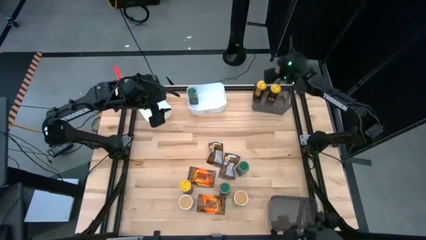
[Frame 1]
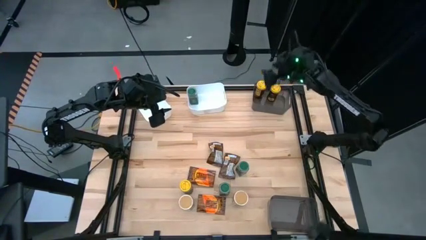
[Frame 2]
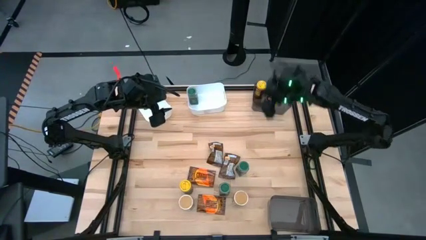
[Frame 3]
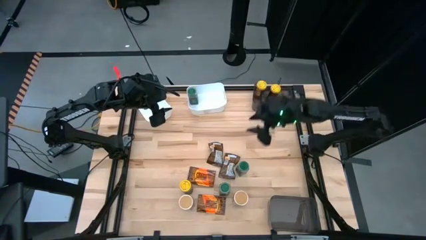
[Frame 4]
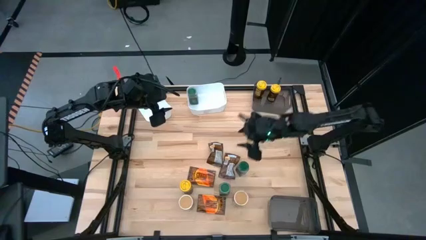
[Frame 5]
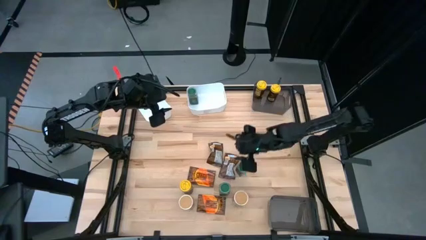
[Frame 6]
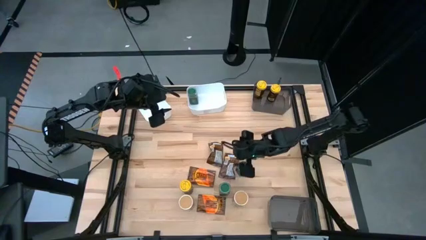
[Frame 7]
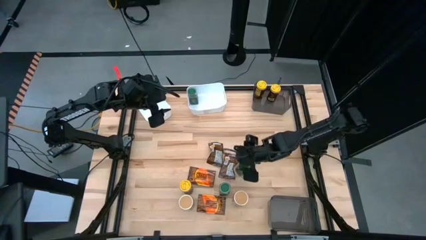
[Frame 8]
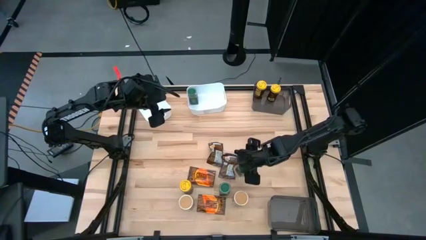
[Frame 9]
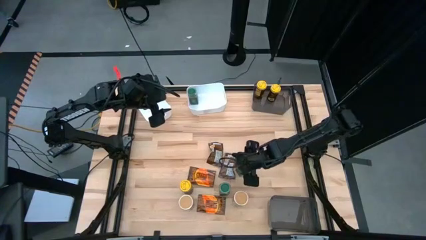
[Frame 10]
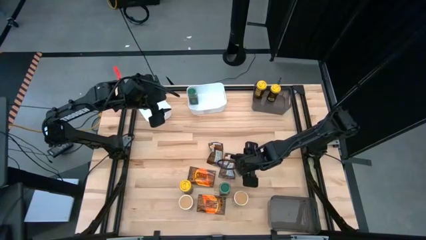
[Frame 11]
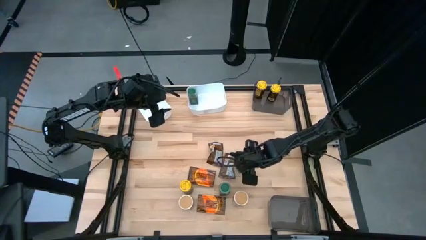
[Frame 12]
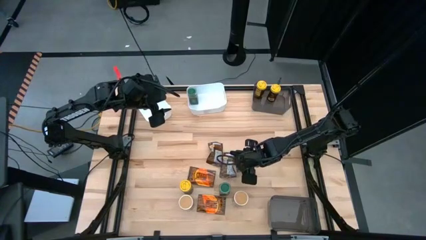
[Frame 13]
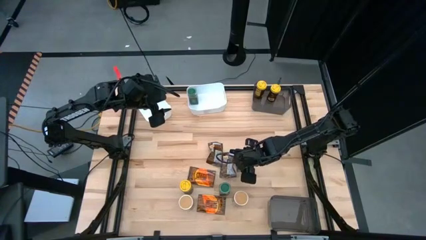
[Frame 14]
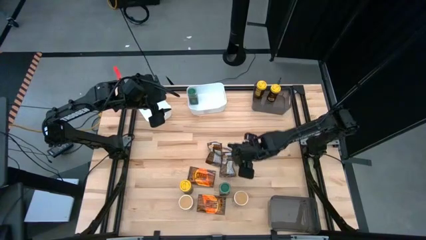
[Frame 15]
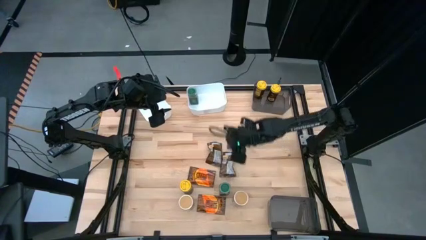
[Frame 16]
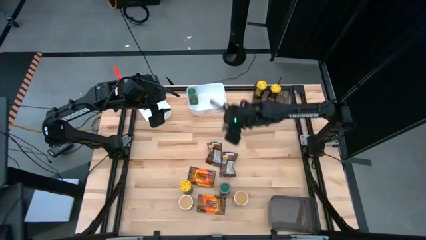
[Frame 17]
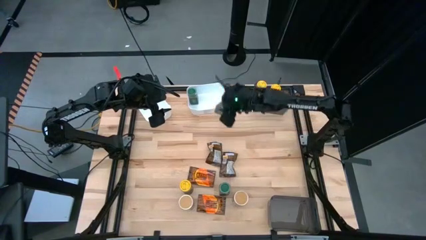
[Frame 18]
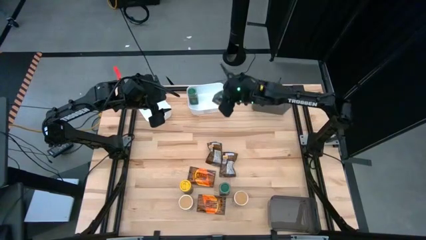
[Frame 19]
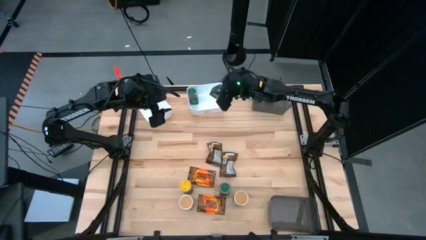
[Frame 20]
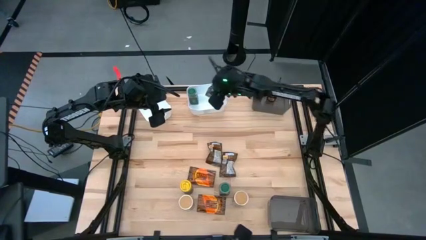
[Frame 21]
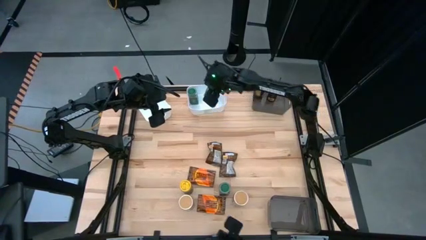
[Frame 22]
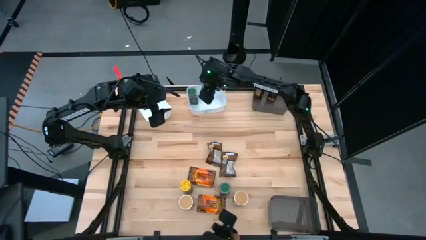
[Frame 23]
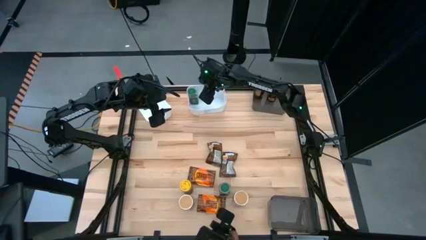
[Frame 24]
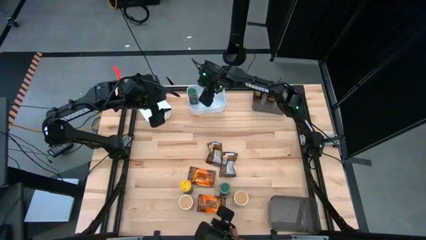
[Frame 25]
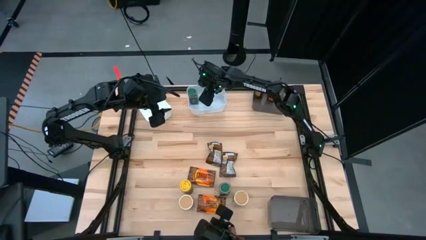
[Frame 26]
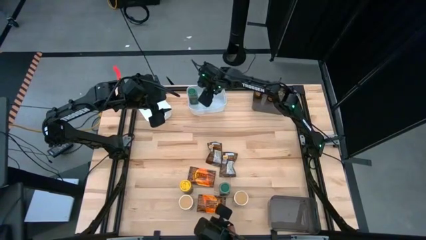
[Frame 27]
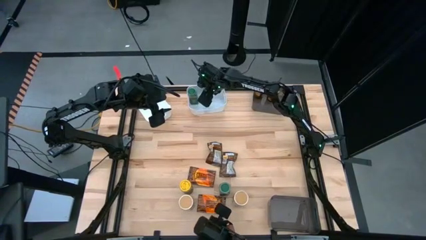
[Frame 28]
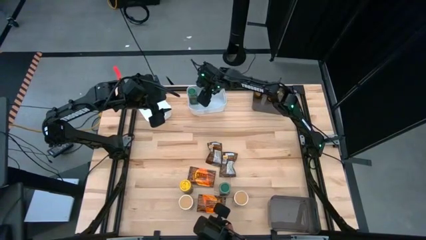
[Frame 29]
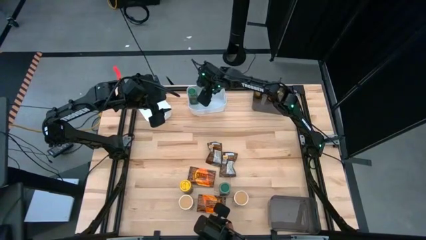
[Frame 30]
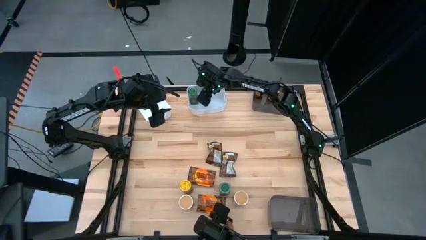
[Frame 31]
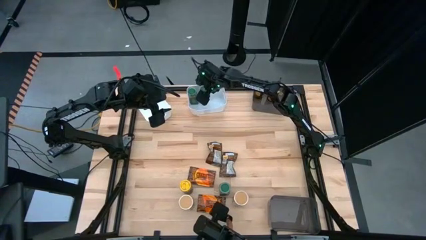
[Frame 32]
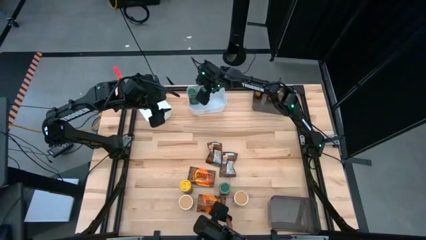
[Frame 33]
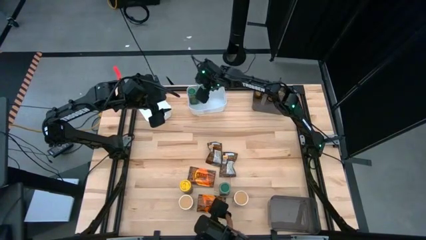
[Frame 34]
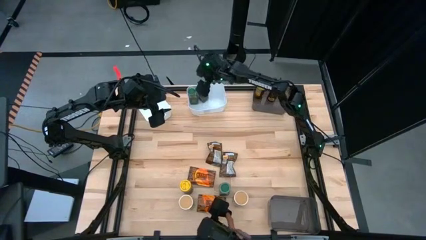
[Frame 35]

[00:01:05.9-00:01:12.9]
Task: Sort spices by type
Put the top green seasoning bottle into the right white bin

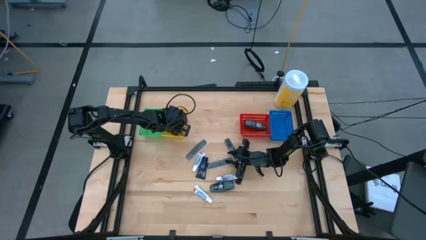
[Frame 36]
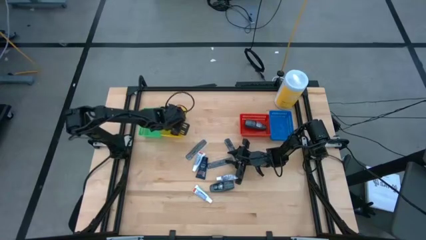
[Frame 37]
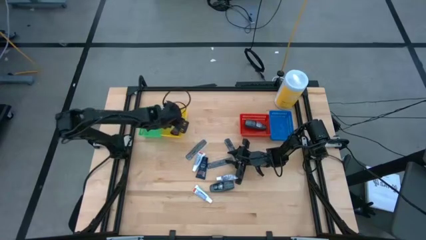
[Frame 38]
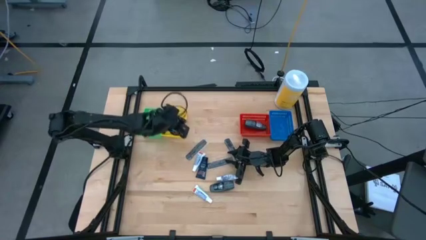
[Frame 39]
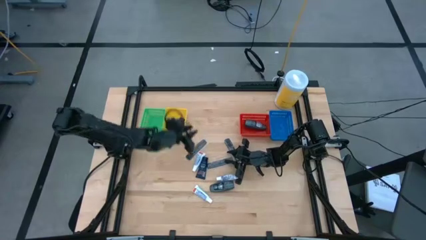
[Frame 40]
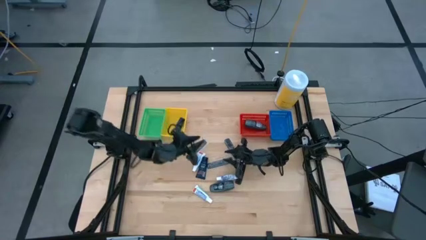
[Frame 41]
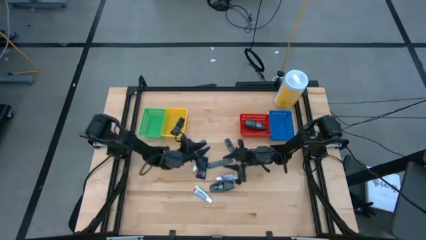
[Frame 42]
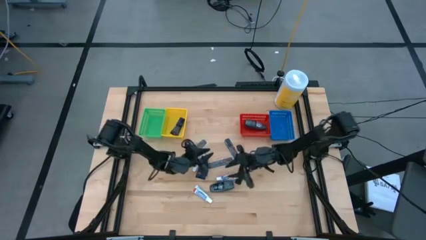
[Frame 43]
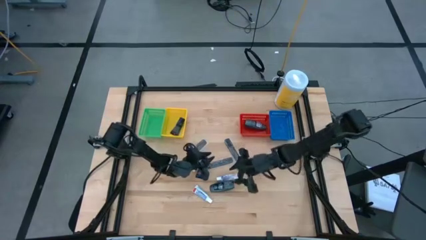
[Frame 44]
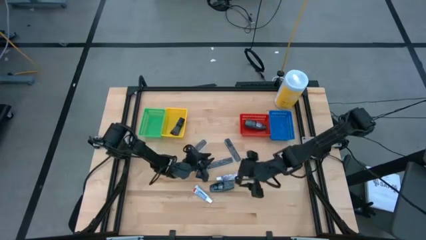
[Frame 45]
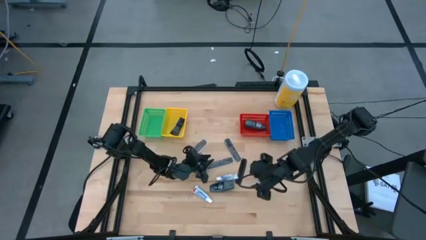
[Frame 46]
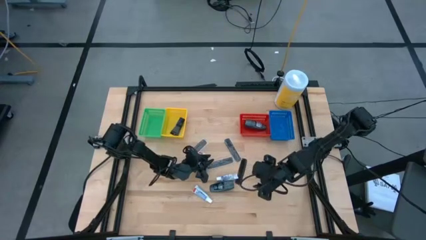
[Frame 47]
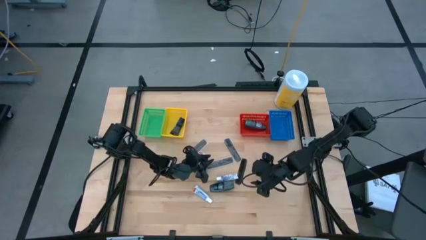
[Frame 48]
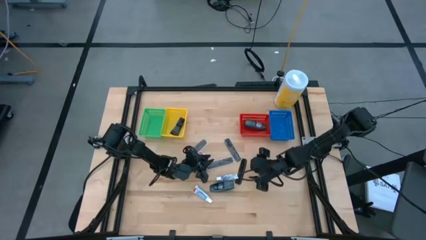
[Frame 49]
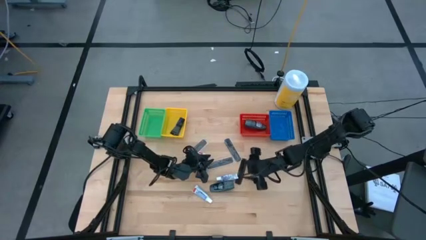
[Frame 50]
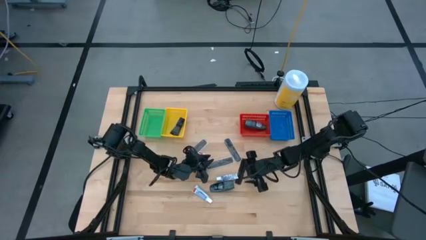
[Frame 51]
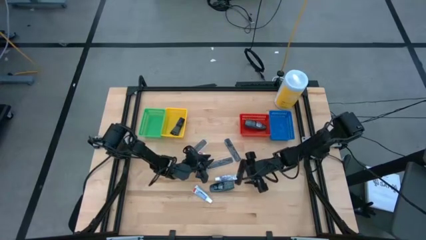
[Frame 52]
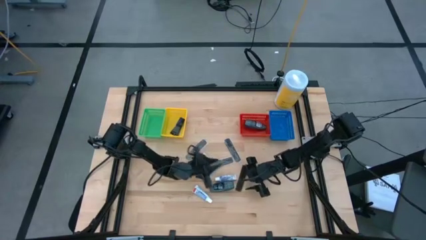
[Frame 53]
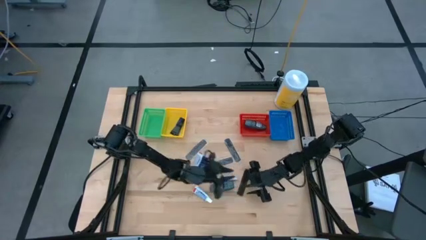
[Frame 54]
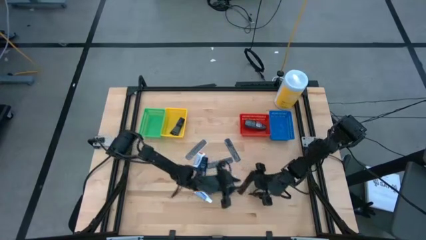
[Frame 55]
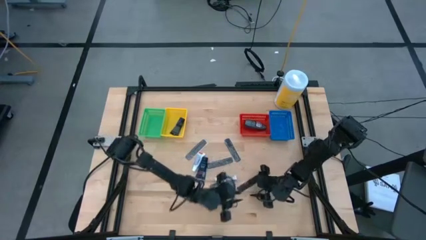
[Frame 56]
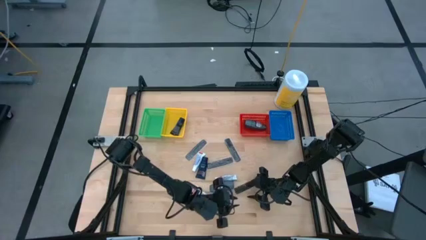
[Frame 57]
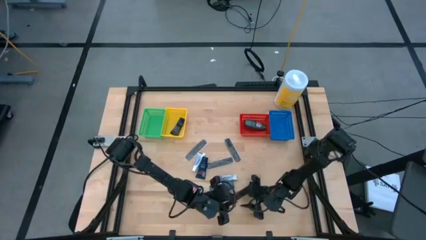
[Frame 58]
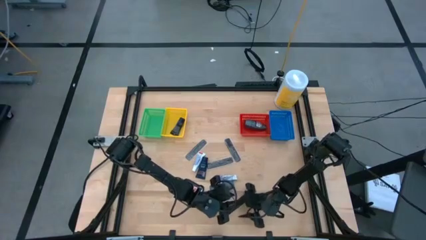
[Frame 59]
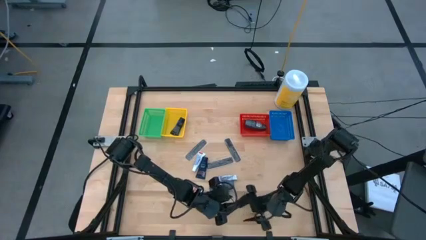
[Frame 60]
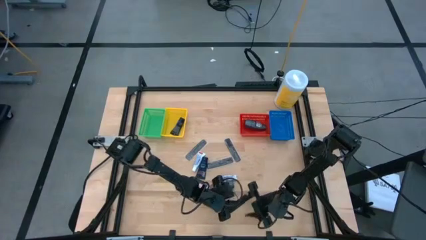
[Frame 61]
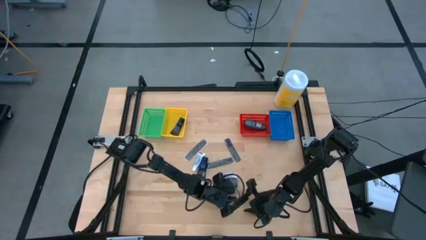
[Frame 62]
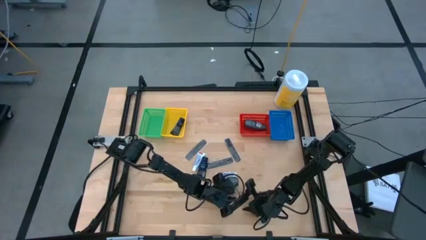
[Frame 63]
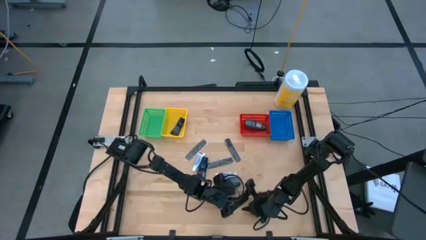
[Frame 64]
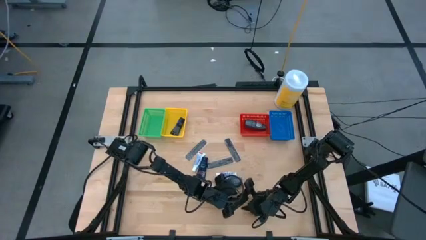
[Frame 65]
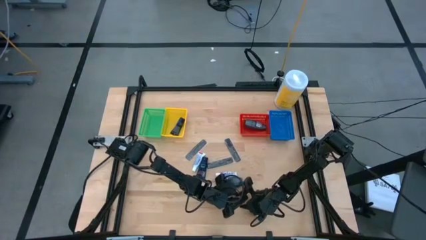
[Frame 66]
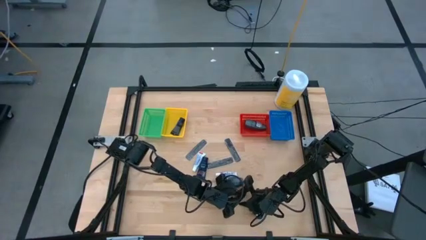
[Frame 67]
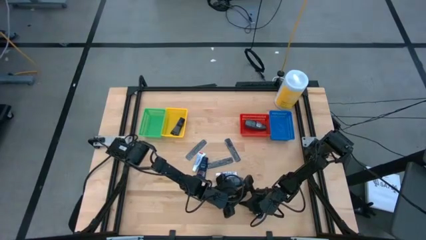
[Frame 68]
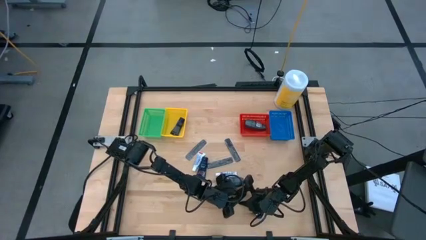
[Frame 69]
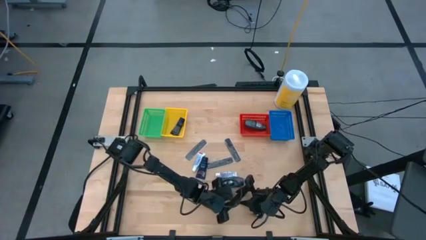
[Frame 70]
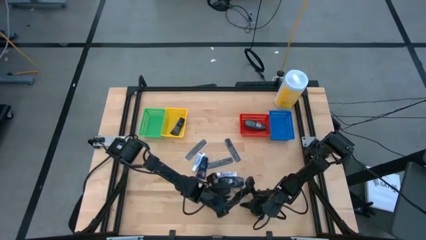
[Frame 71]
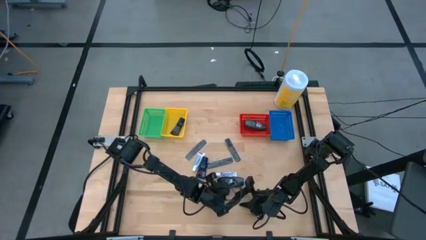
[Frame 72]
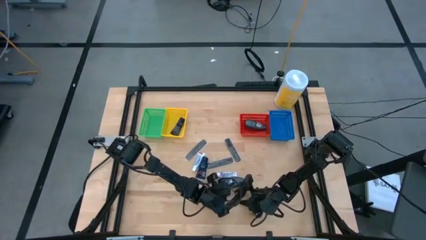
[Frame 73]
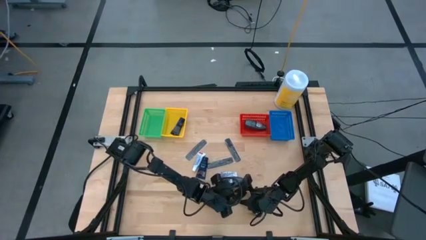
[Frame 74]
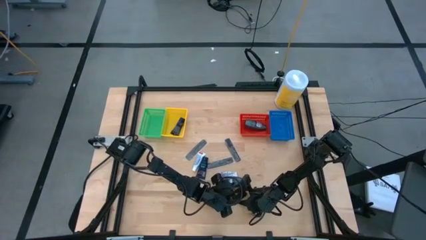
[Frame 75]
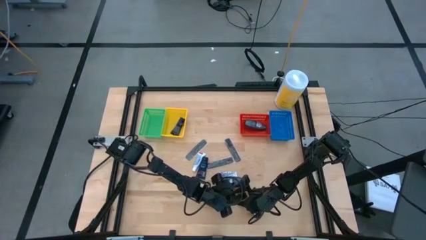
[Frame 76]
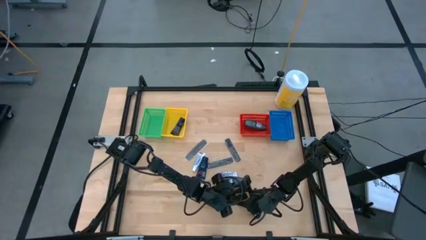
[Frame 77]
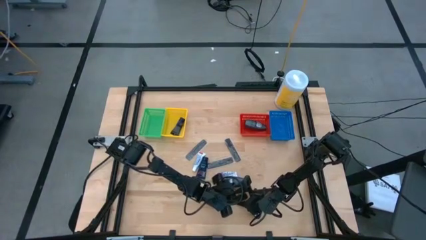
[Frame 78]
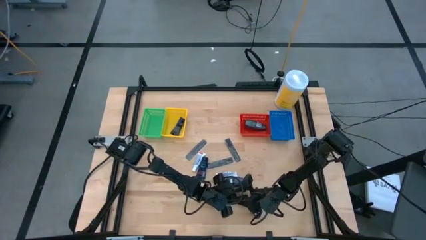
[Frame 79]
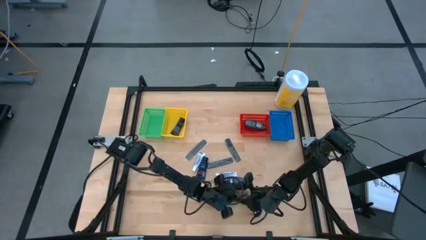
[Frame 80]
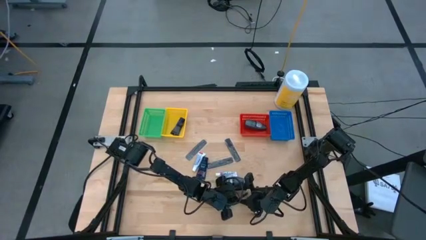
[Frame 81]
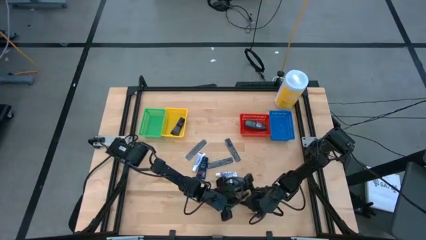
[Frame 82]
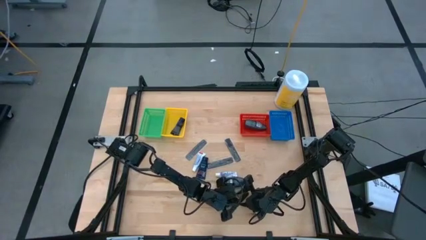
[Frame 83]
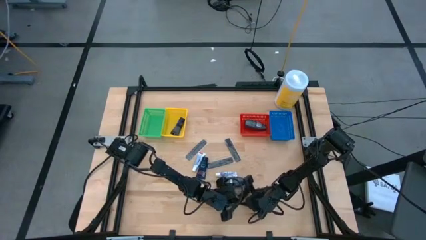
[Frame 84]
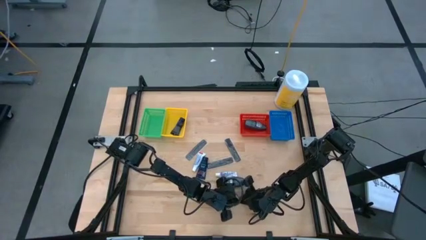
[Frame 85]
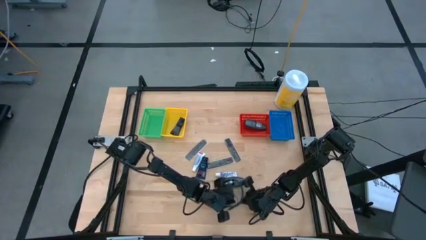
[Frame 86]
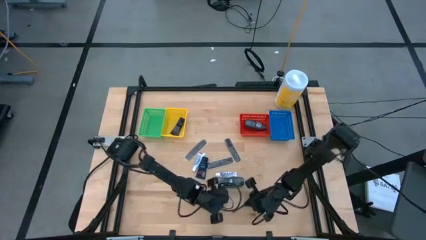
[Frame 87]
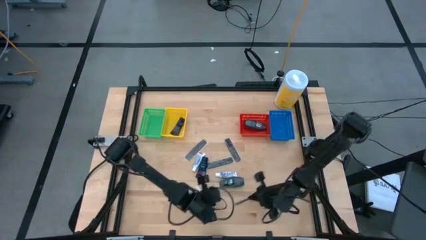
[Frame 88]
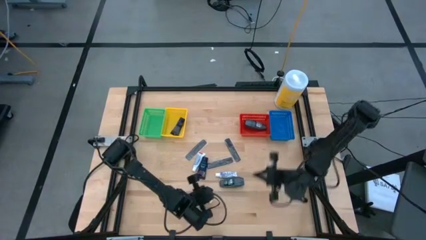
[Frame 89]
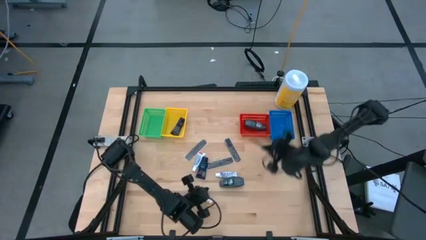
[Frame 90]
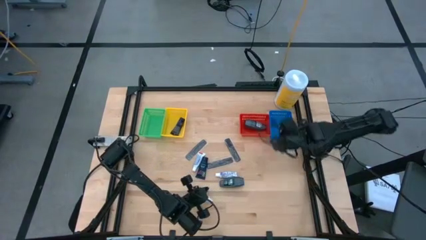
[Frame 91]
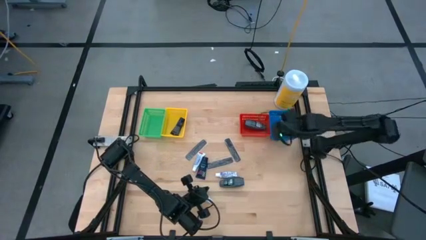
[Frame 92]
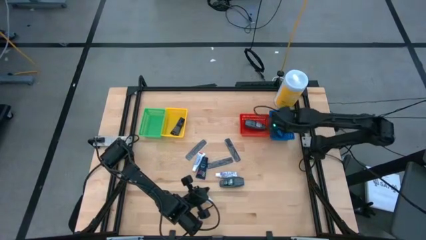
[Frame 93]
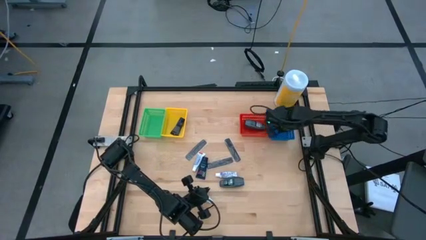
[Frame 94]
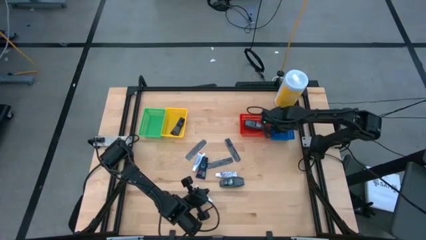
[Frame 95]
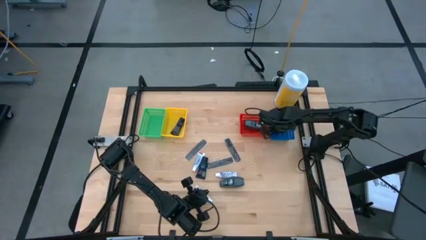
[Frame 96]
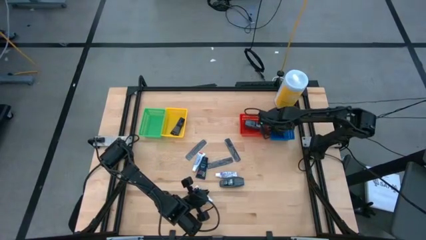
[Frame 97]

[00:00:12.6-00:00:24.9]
Task: Pick & Place Travel size toiletries
Put the comb into the blue bin
